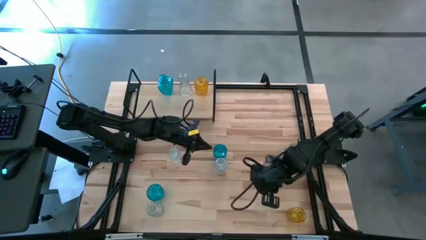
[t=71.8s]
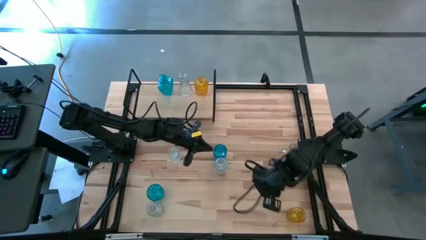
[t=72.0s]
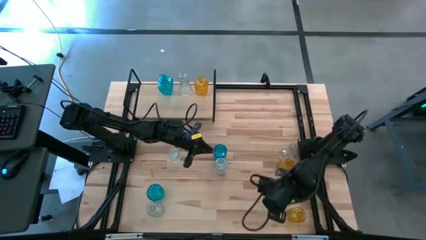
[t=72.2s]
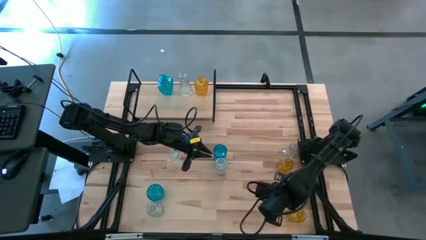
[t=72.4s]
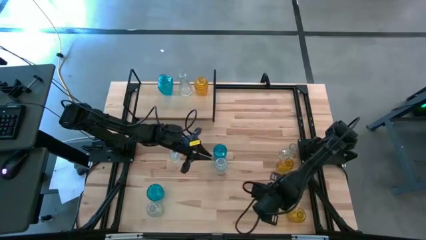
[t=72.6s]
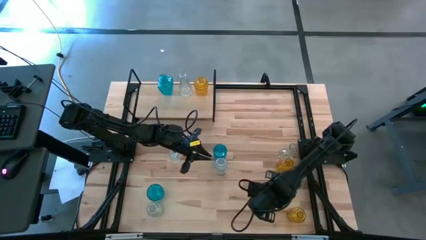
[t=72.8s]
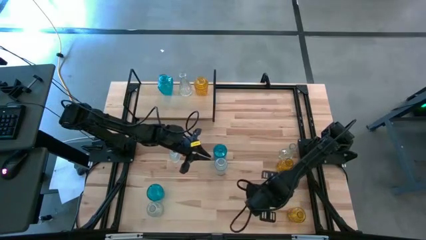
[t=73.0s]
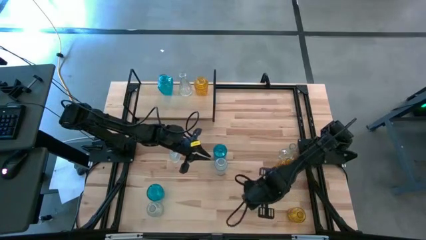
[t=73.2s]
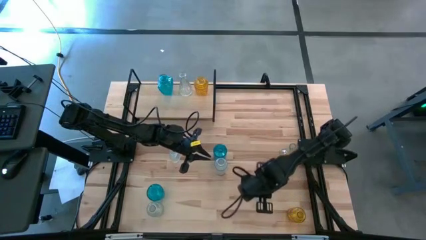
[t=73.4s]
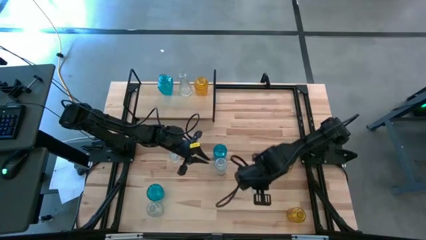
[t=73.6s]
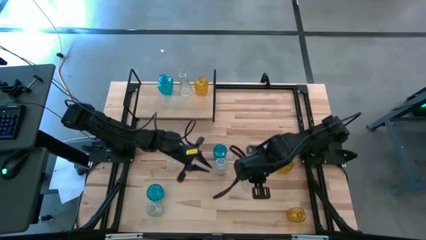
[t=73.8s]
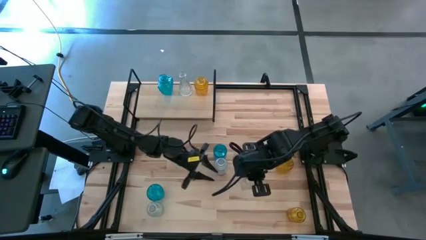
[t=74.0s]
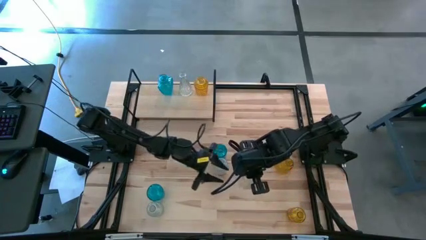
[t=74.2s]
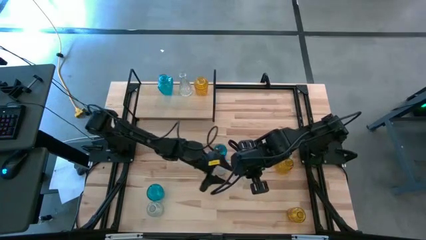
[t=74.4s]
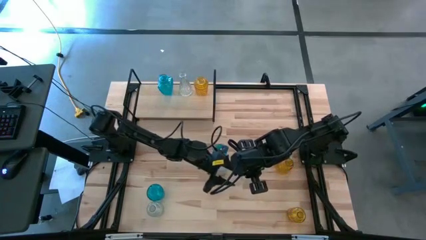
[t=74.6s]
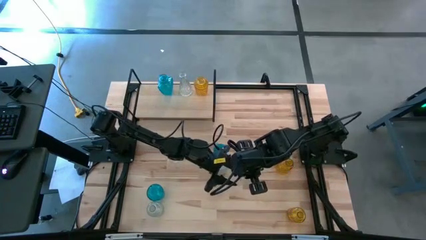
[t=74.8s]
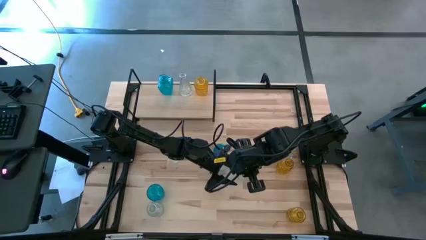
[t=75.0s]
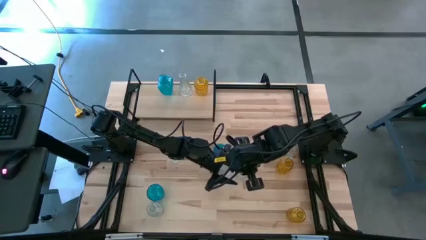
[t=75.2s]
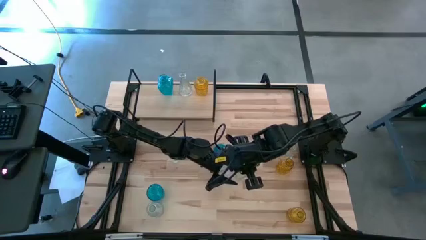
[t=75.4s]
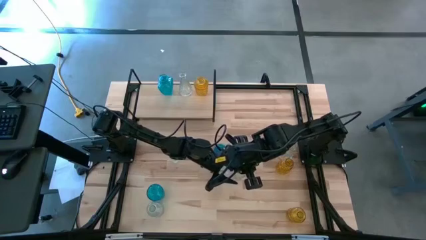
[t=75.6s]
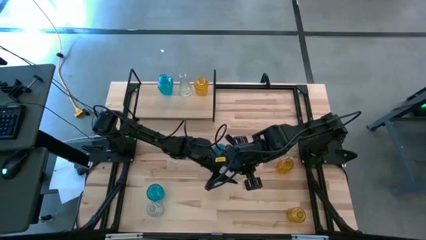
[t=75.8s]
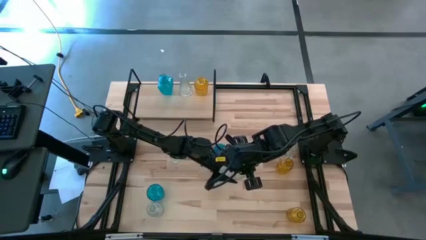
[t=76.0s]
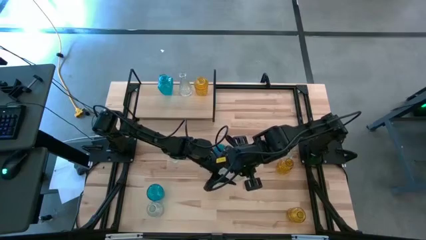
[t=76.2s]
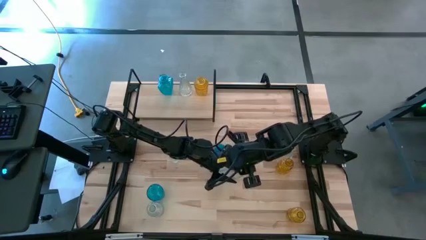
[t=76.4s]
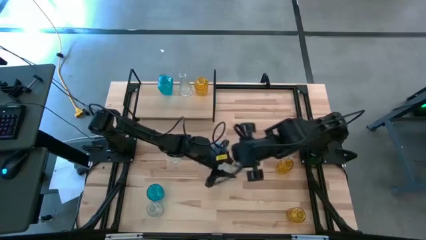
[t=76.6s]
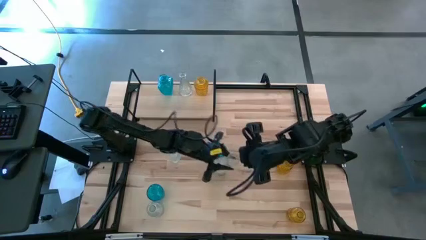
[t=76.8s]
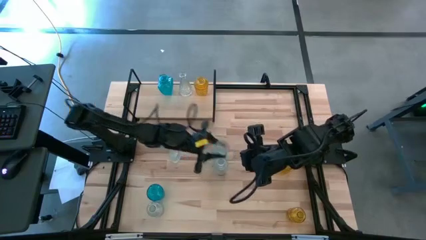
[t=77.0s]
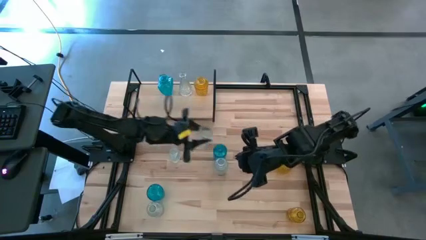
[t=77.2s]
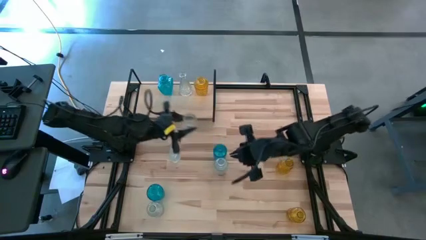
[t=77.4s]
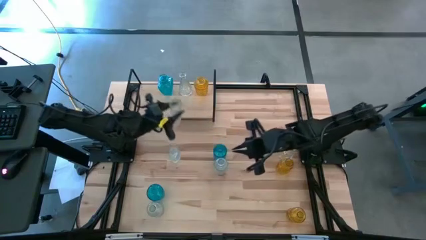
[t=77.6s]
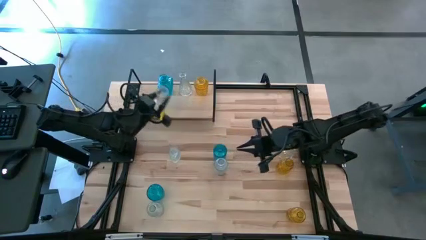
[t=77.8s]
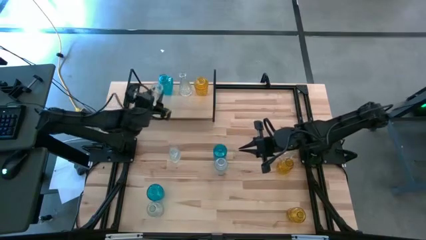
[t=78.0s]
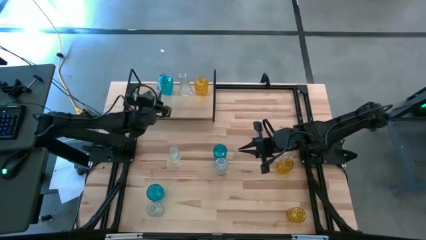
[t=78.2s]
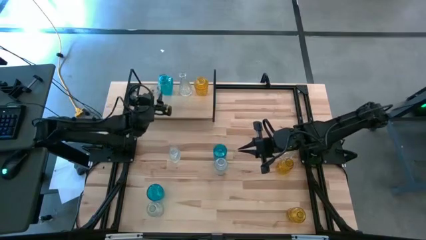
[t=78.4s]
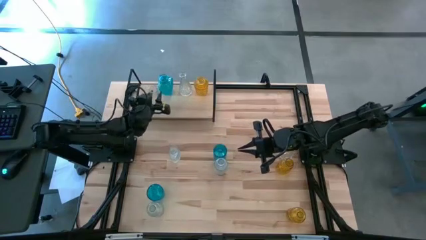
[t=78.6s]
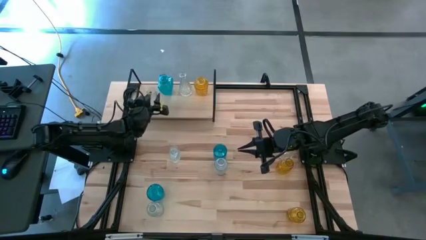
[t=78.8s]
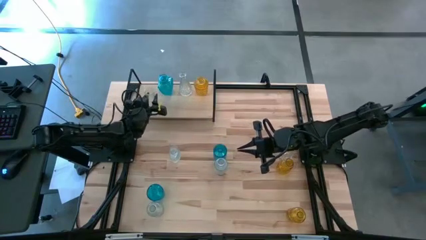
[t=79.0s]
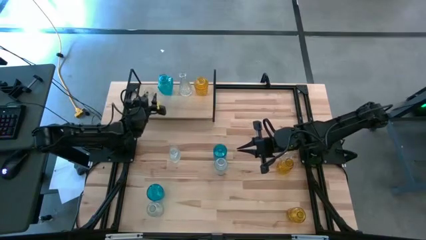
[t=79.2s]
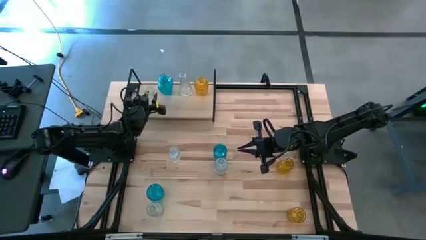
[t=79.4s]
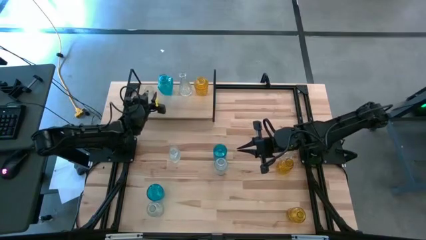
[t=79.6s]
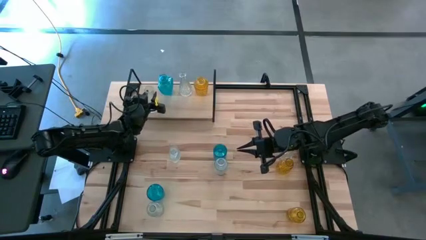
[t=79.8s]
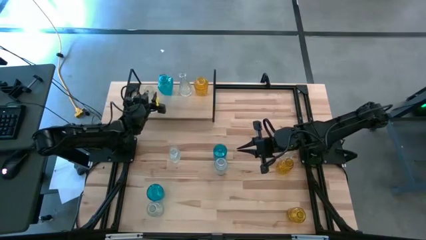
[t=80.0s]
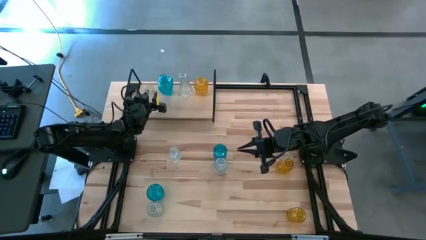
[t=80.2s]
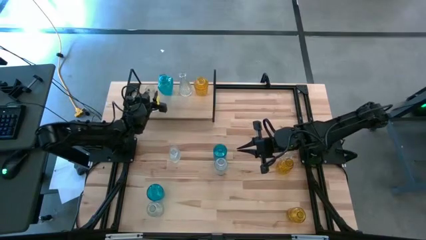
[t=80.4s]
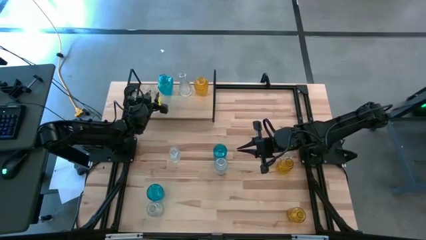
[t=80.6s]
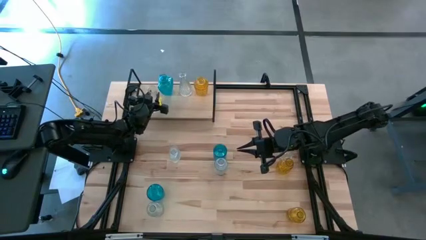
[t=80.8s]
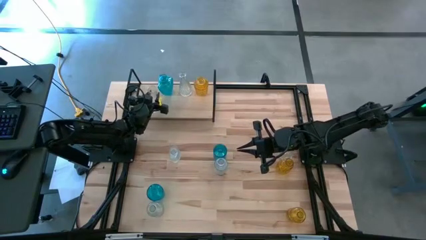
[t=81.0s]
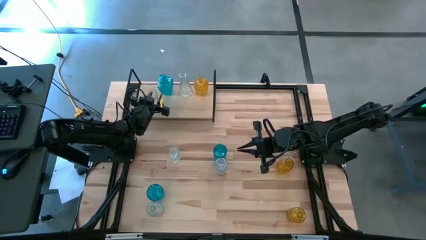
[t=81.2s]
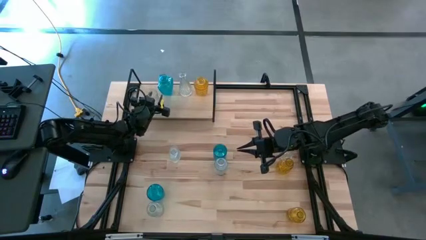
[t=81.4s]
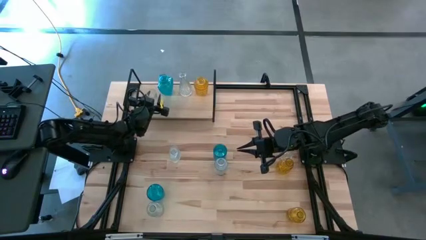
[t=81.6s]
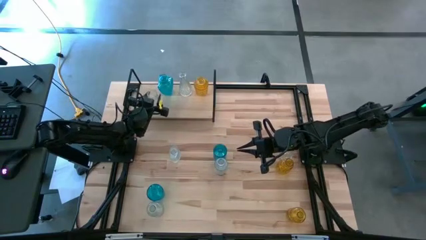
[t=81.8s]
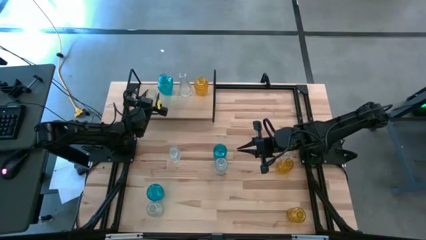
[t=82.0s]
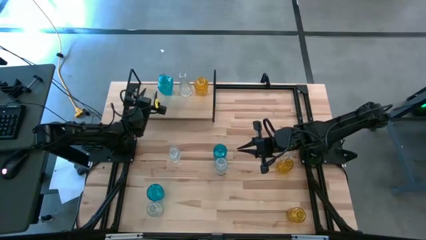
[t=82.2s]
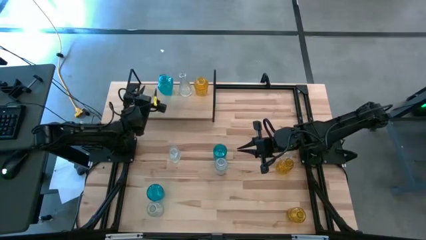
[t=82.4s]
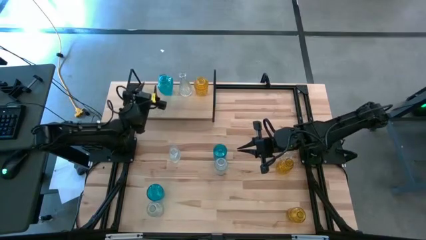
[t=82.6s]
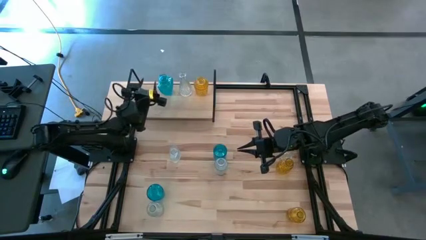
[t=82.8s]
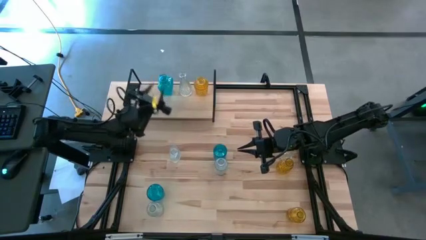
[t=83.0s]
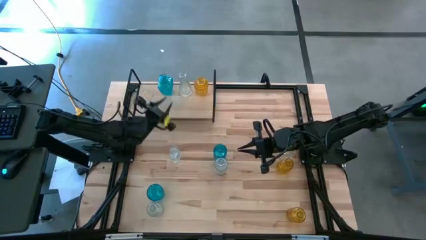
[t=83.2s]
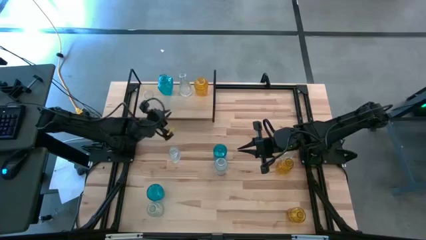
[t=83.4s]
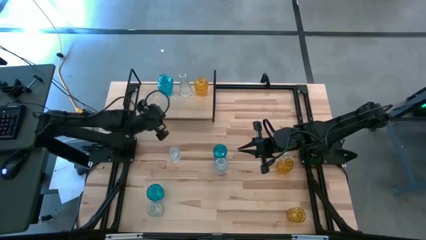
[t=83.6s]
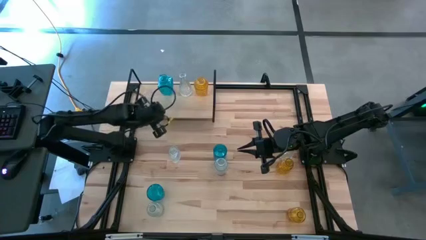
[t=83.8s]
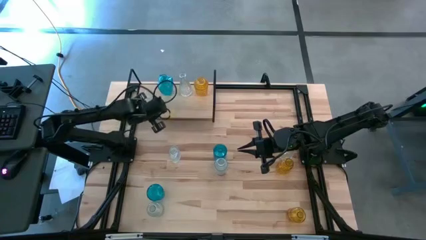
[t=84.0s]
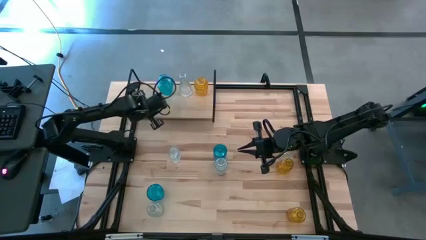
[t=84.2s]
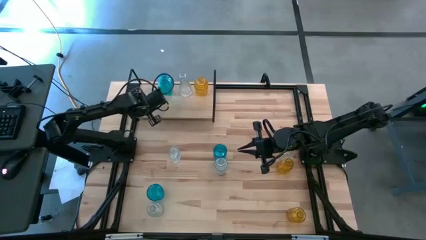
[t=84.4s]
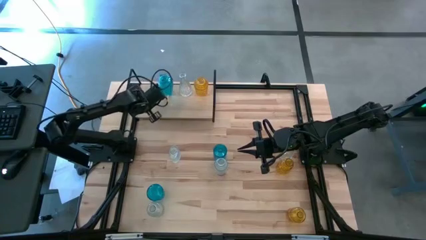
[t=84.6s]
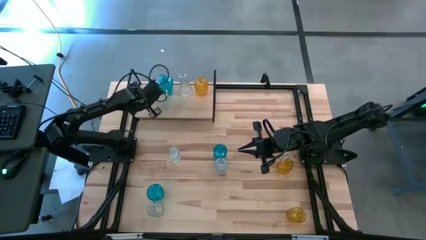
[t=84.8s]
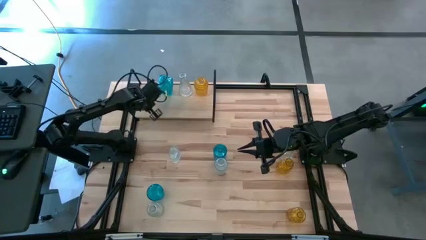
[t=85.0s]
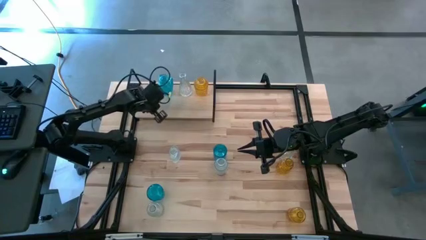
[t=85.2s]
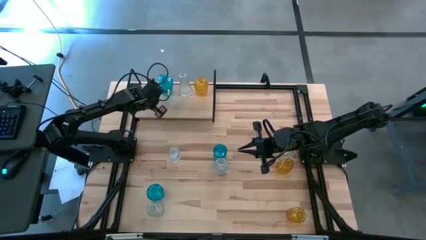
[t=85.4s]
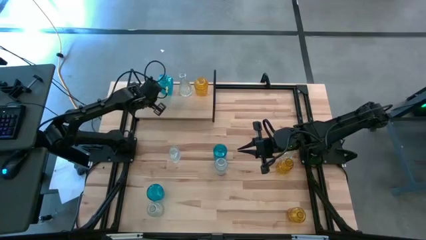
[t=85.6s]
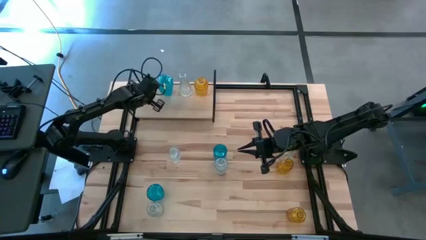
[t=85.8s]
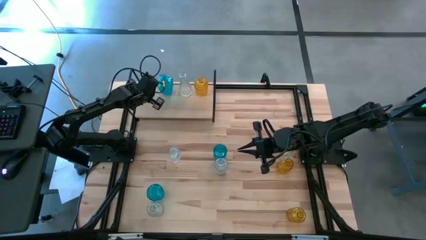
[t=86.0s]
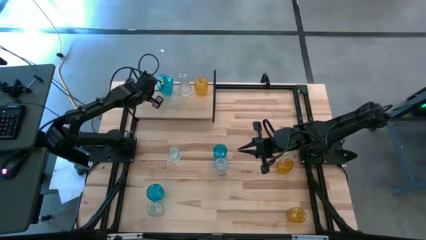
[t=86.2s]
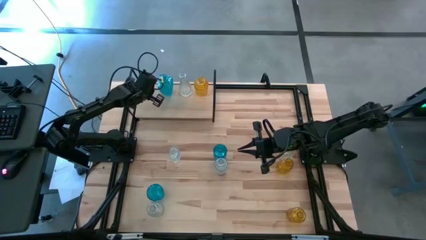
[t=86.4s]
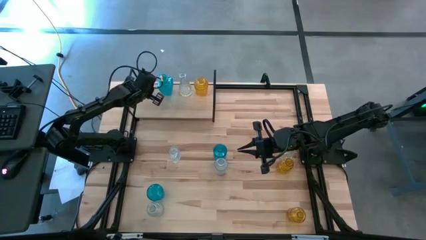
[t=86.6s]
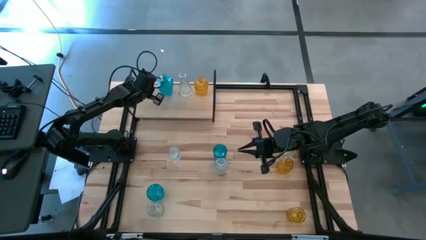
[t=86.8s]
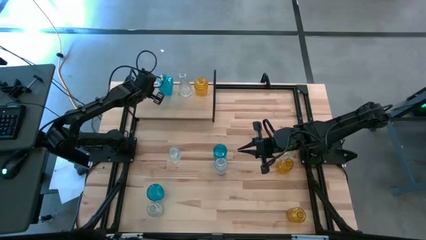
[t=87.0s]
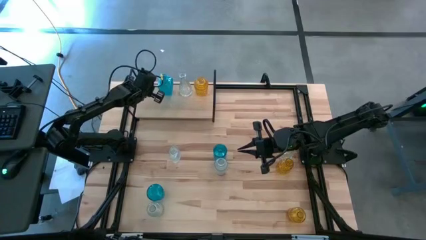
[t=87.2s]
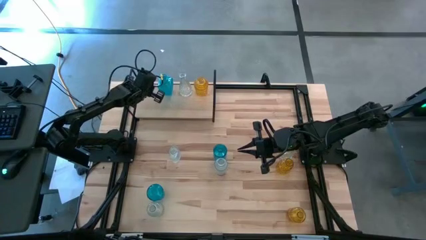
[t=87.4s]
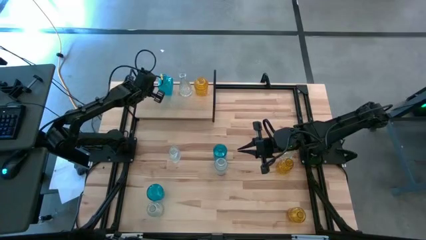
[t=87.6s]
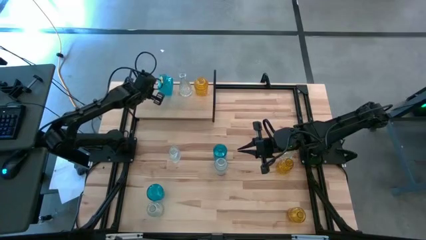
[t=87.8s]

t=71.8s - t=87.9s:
Task: sort vases onto shelf
Put the transparent vase on the shelf
